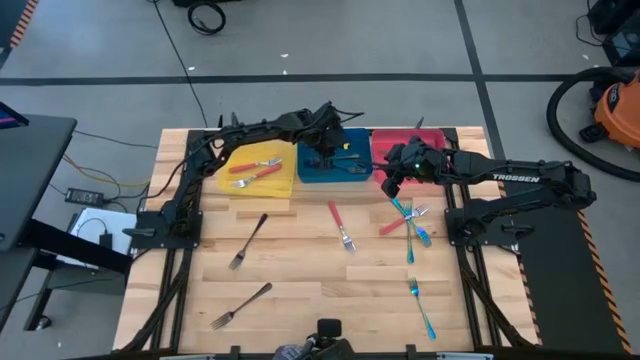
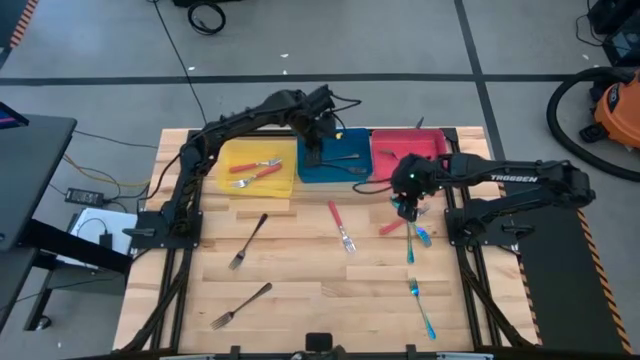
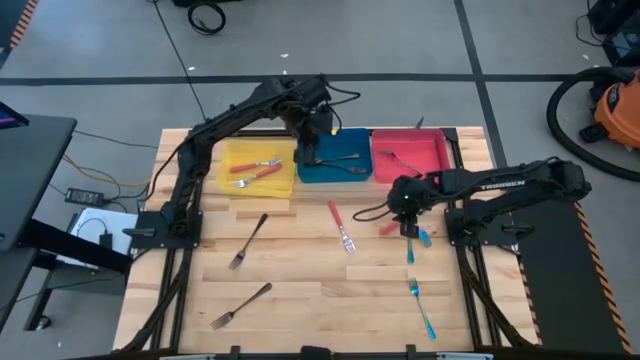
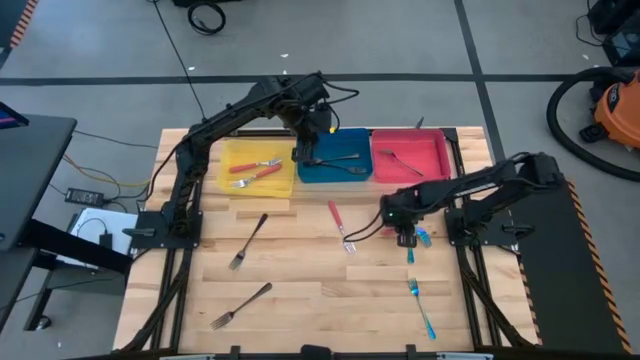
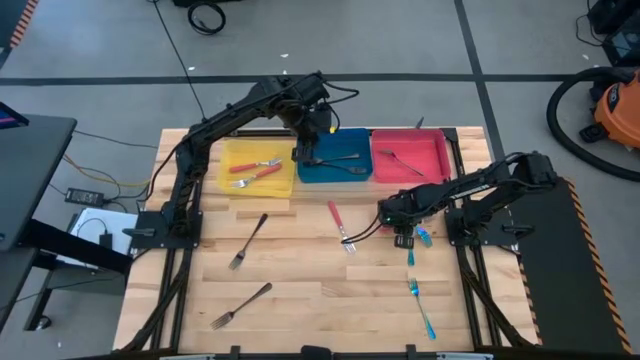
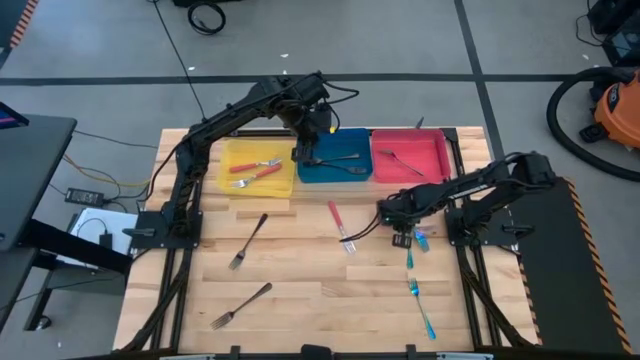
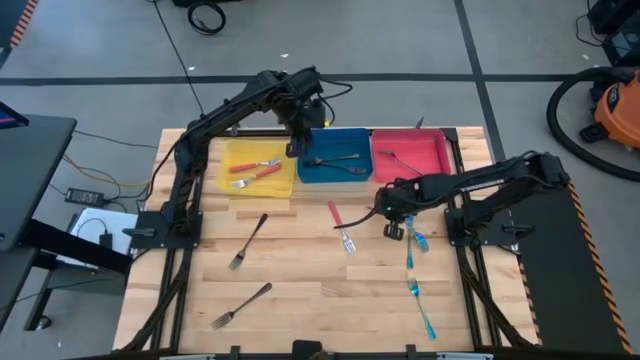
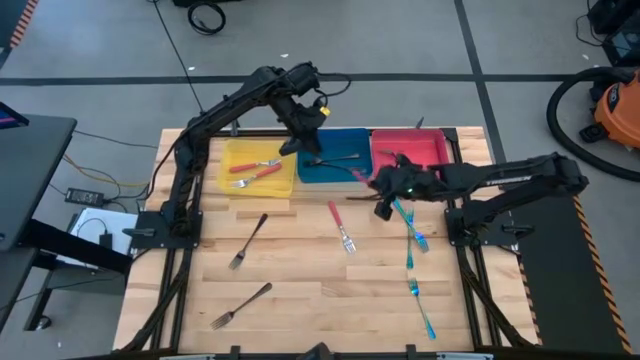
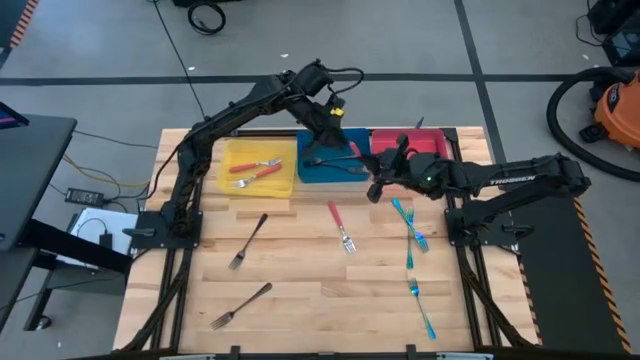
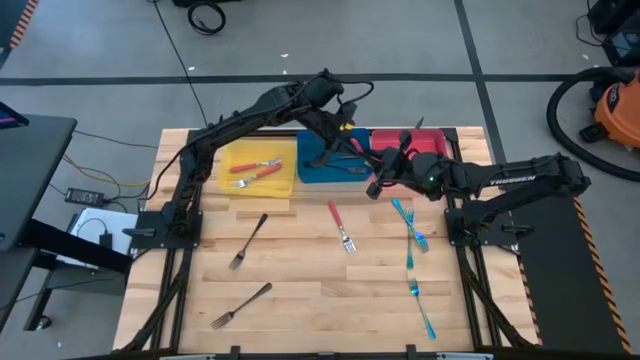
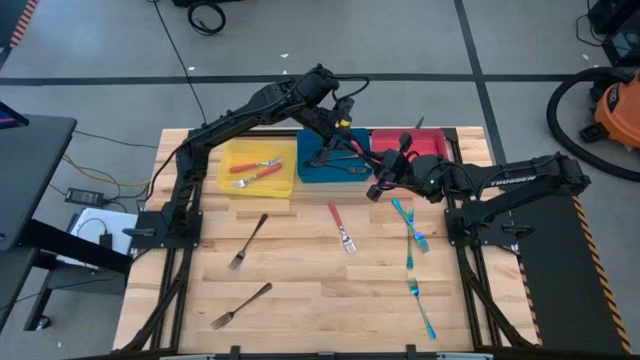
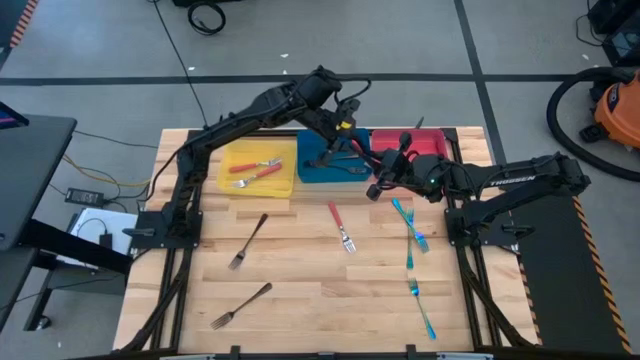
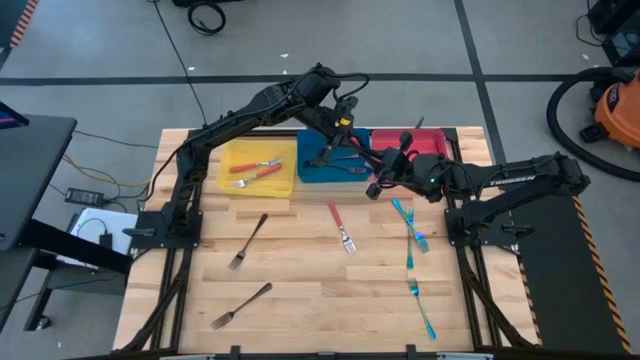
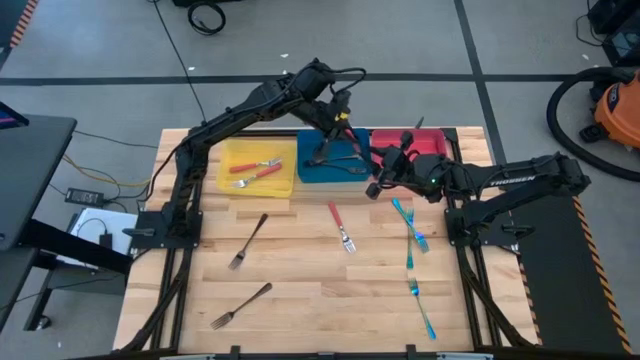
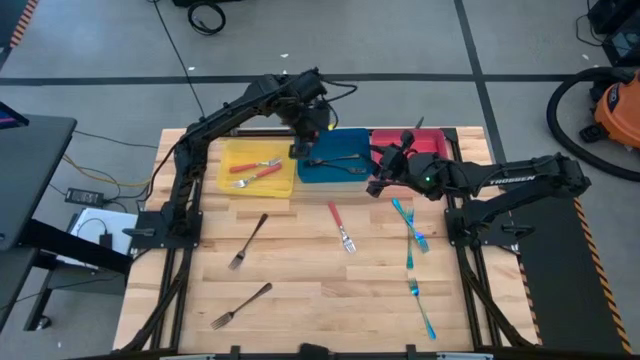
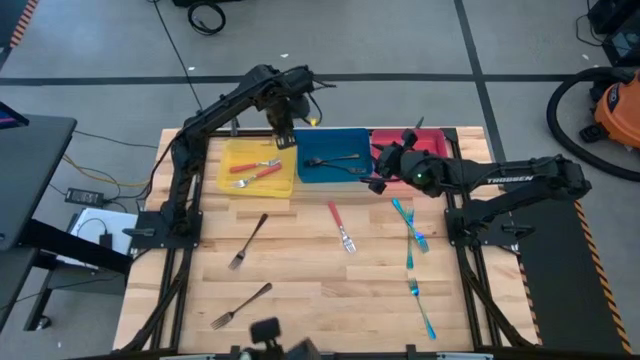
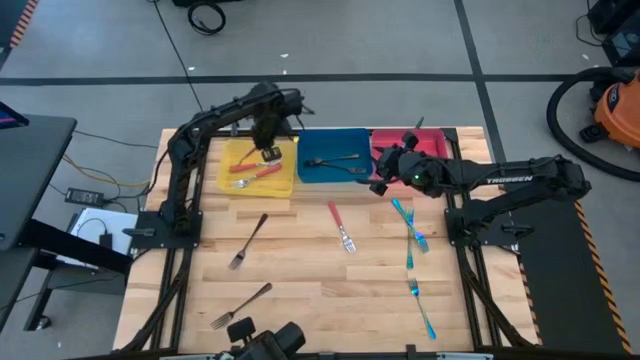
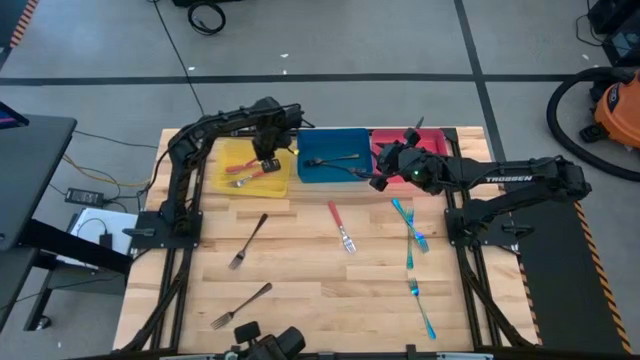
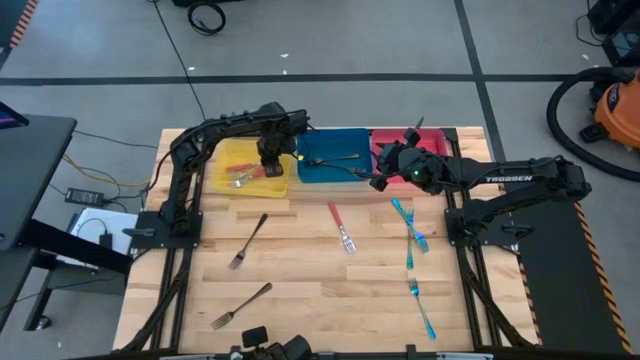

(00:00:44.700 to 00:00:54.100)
Task: Sort silverware by color (type)
Put the right pink fork into the yellow bin

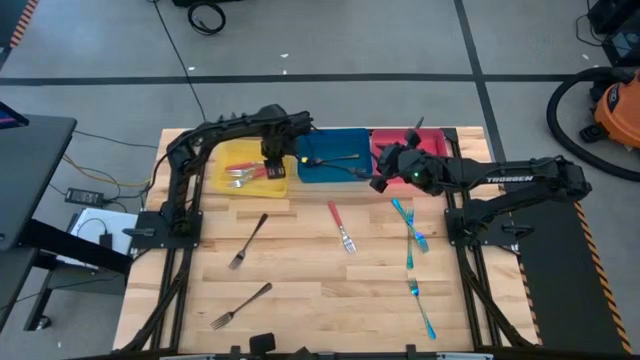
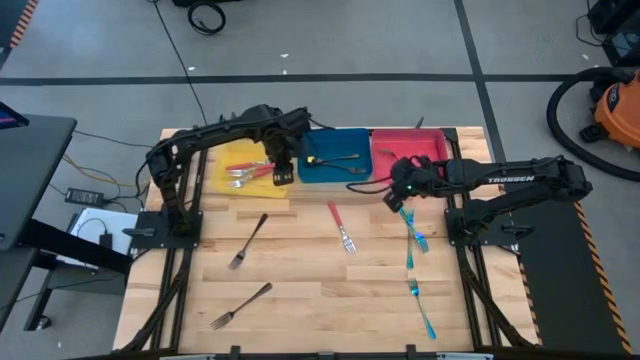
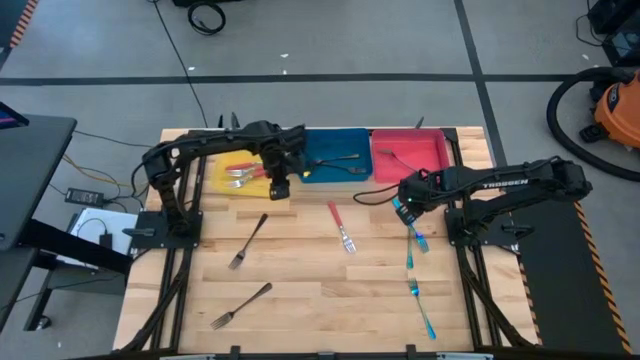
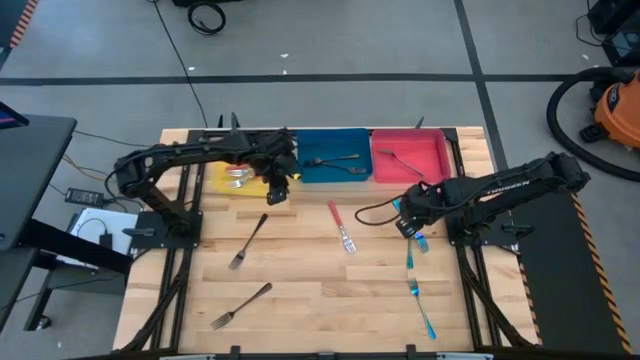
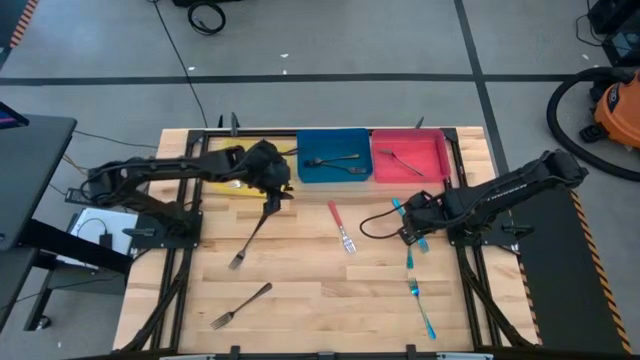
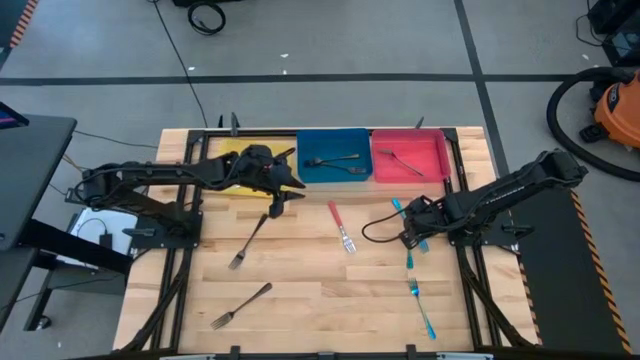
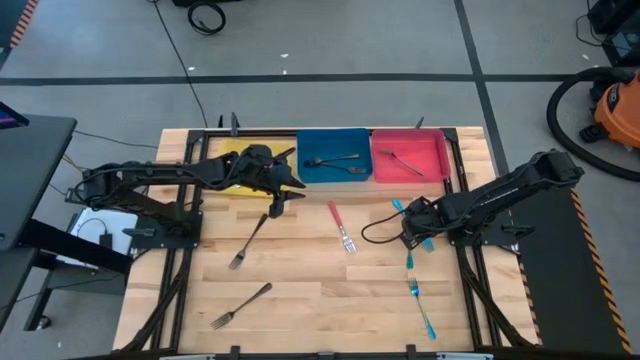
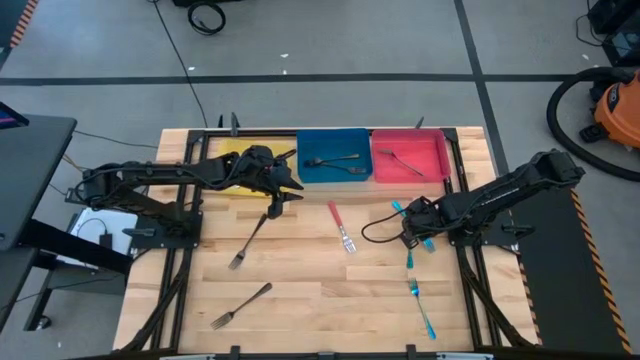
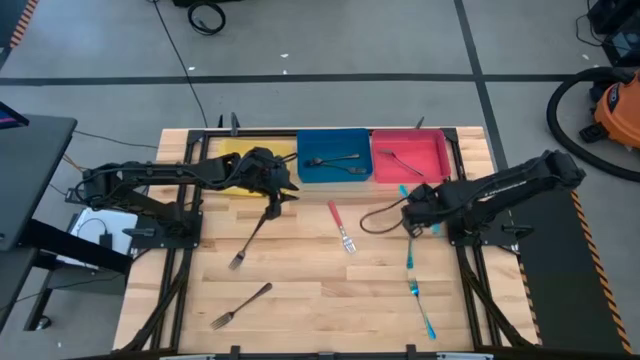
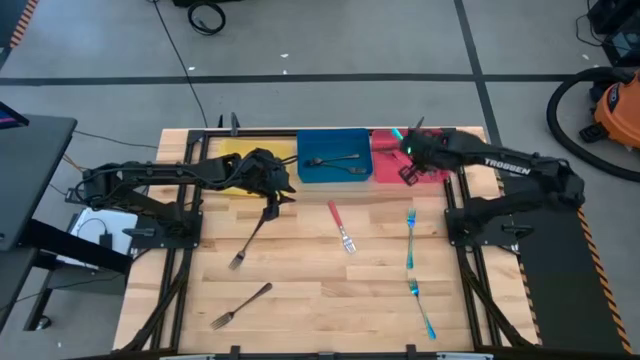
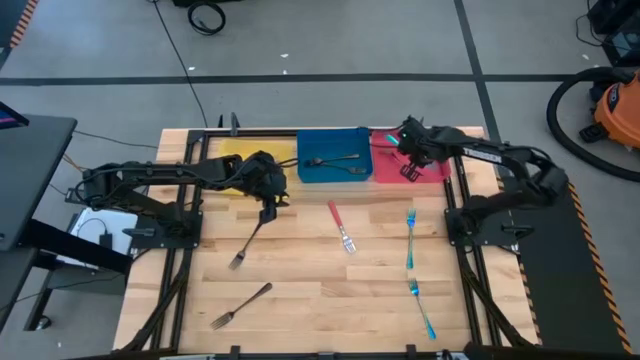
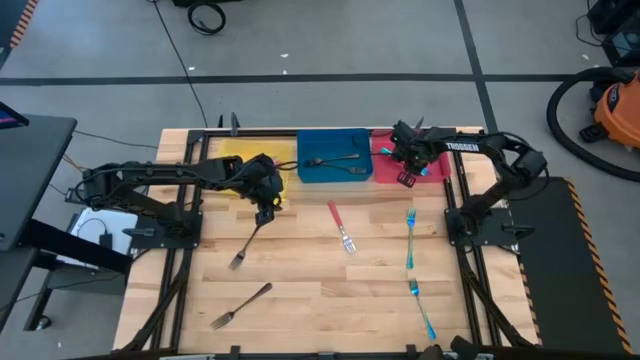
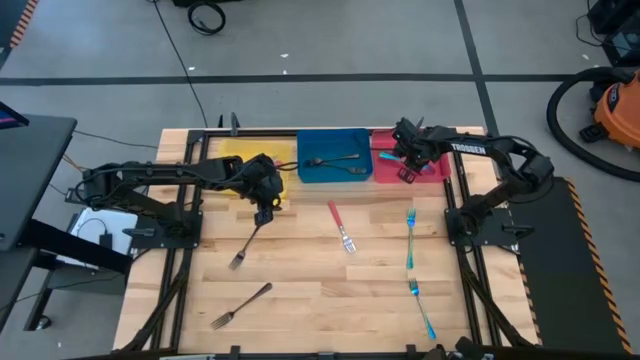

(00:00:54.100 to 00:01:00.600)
Put the top blue fork into the pink bin

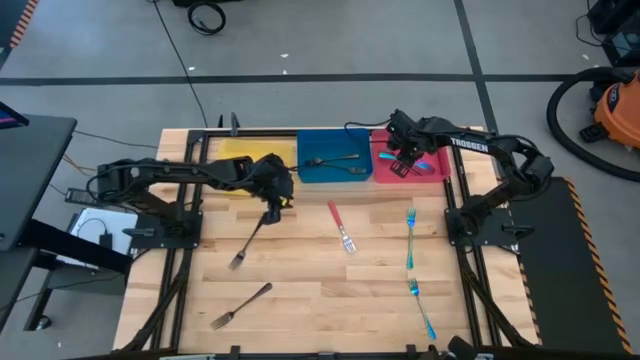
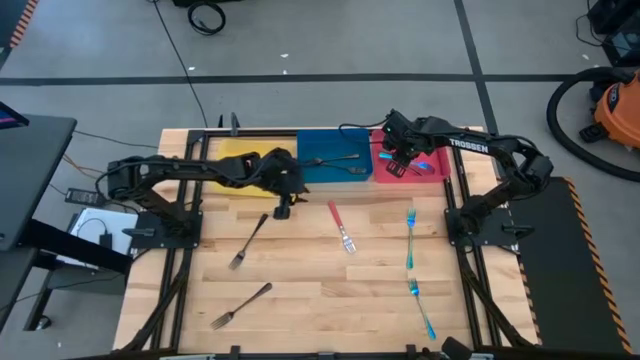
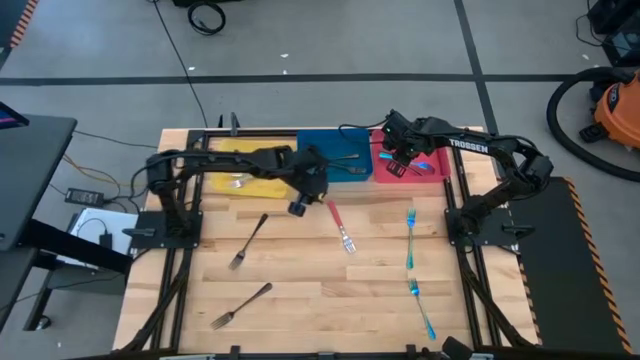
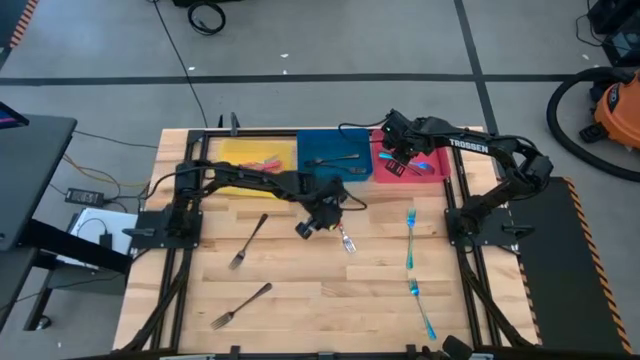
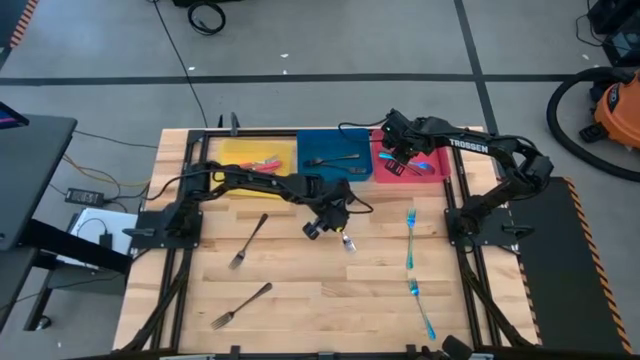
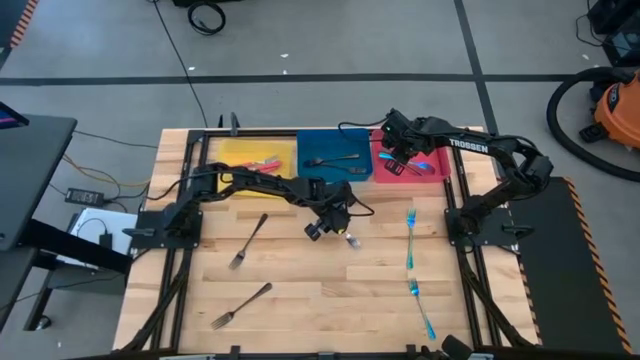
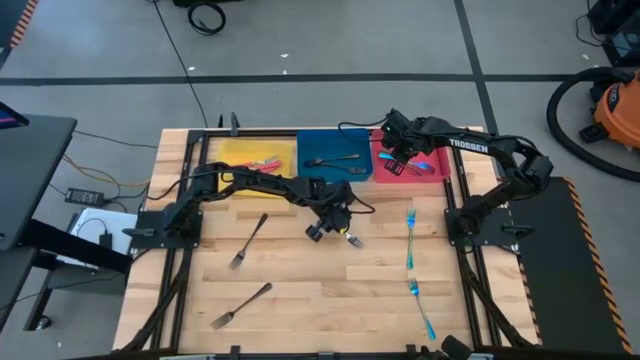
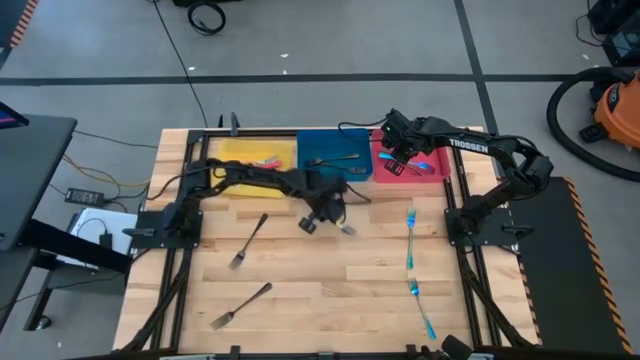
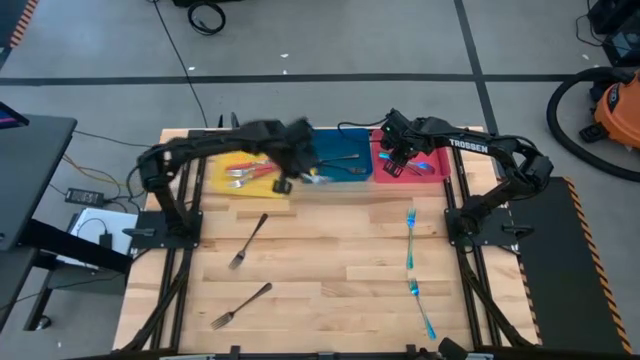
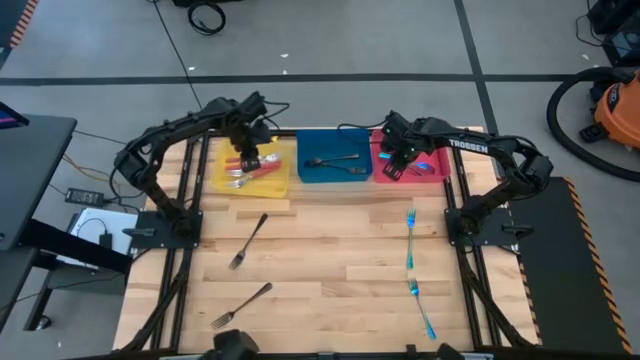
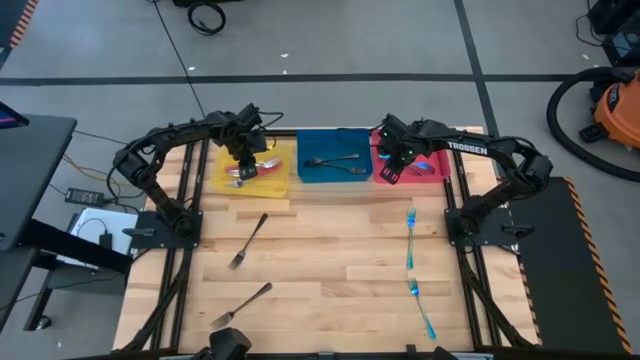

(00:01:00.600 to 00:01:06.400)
Put the pink fork into the yellow bin
